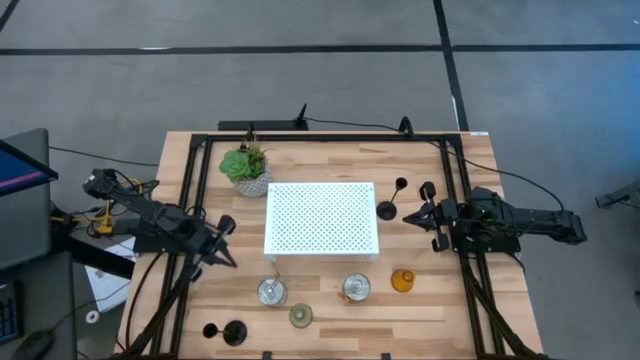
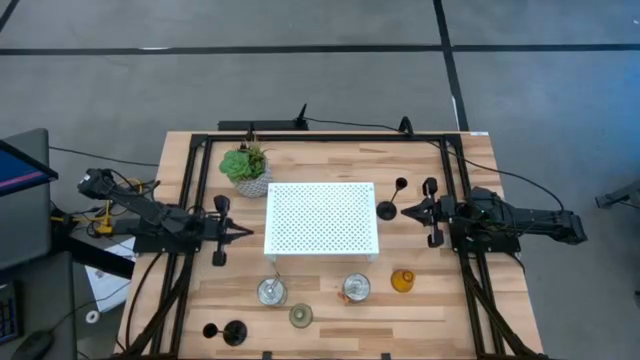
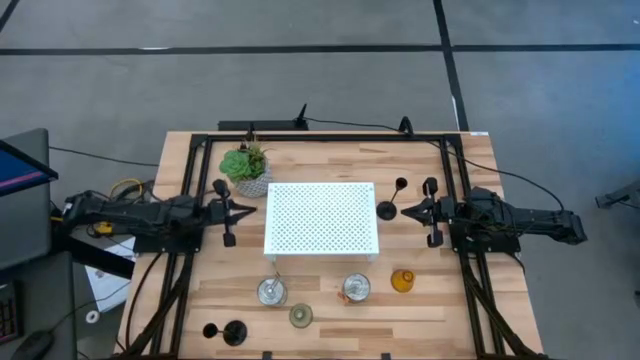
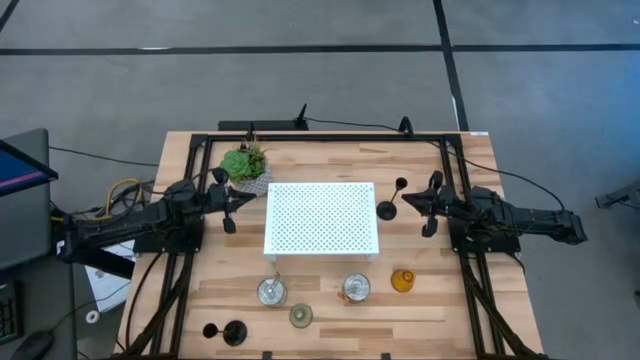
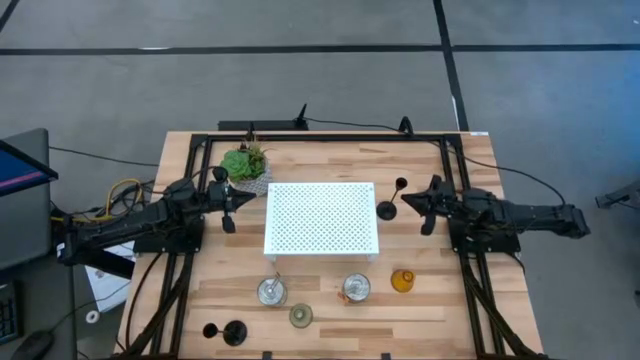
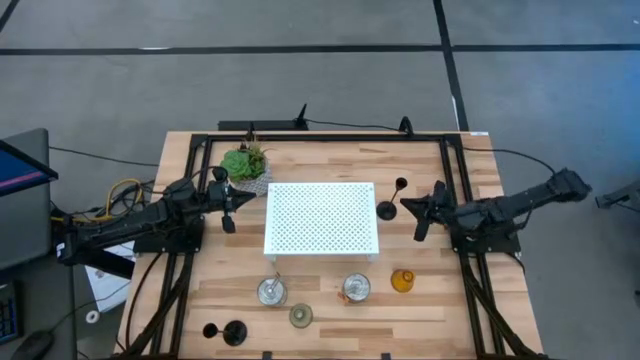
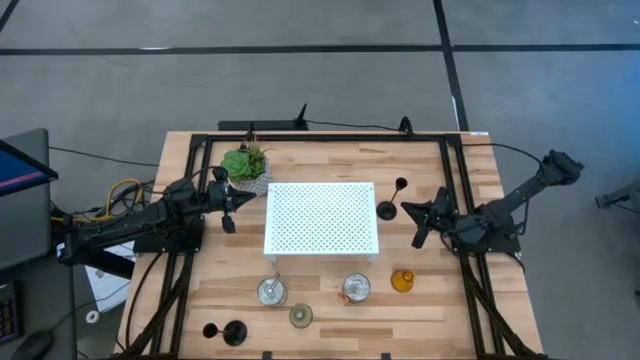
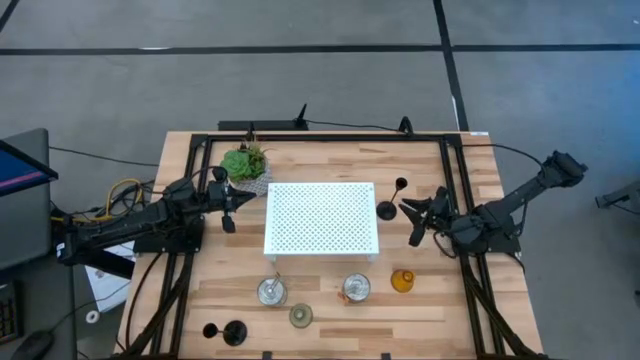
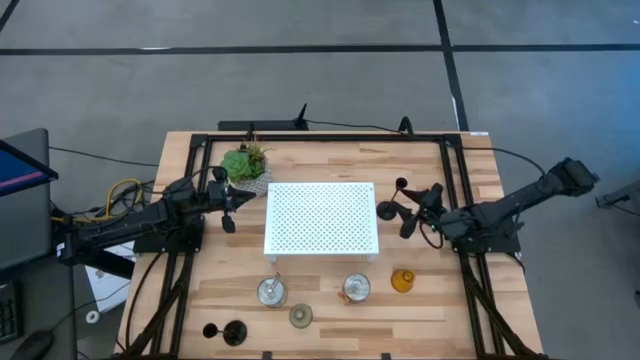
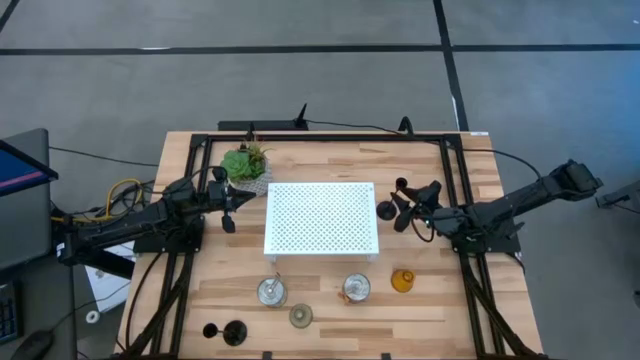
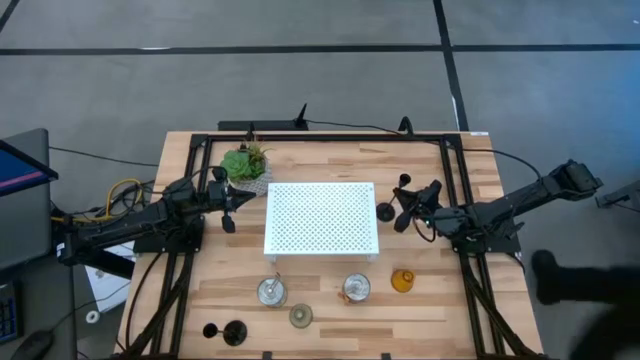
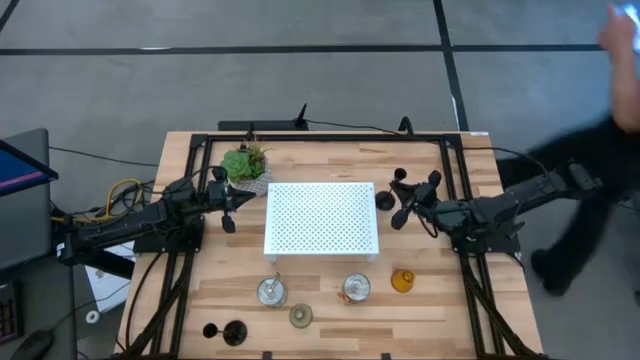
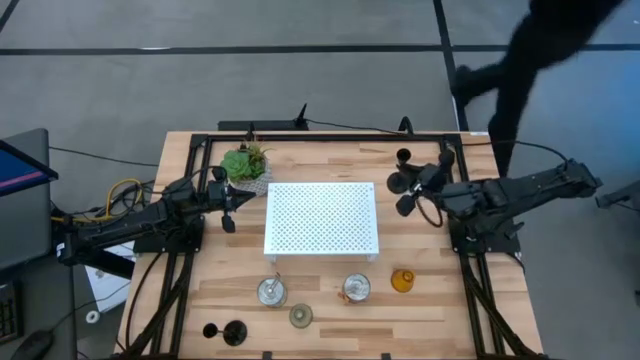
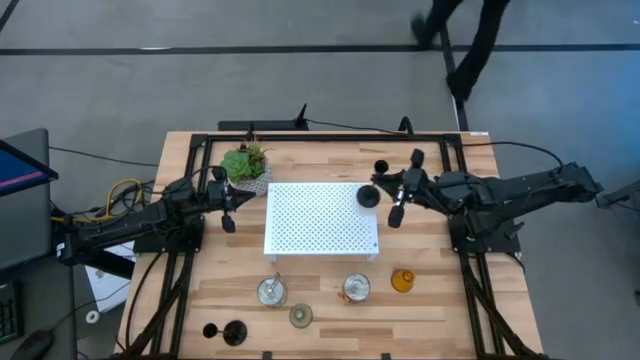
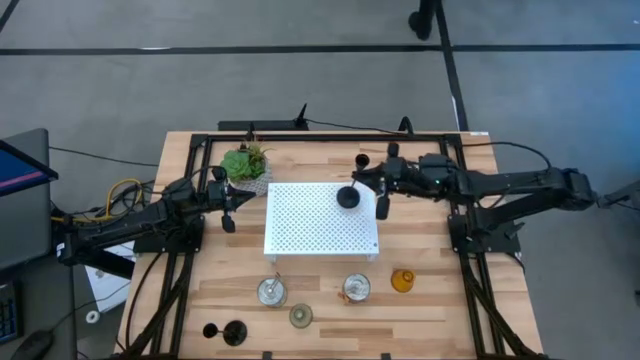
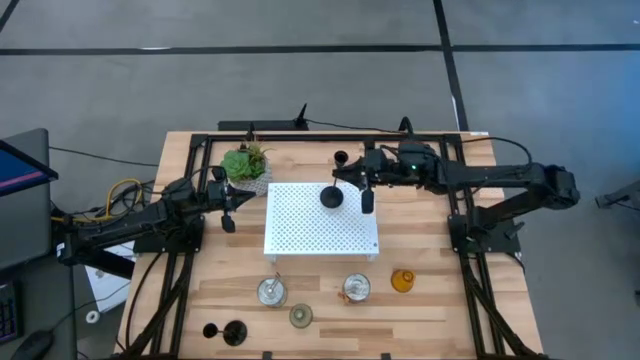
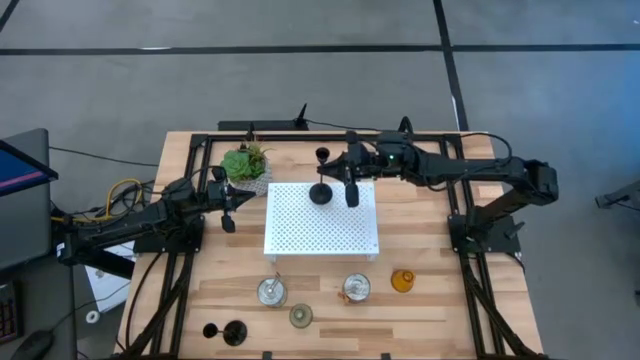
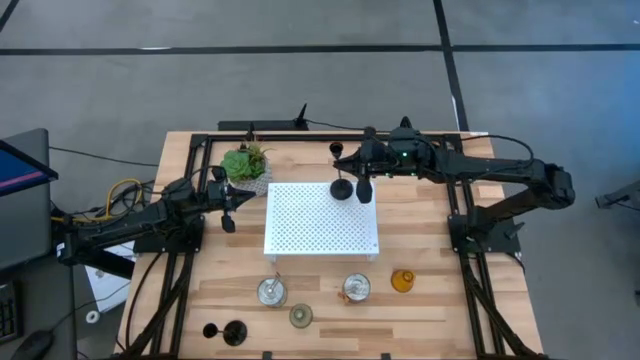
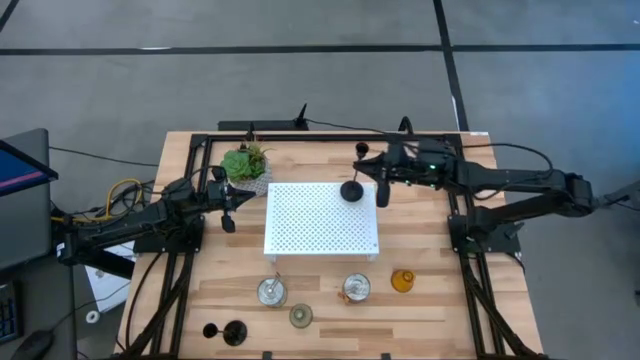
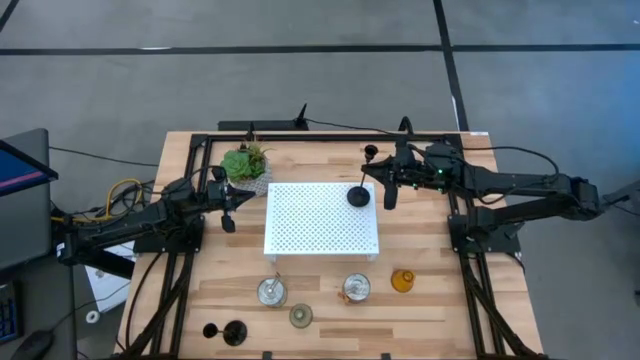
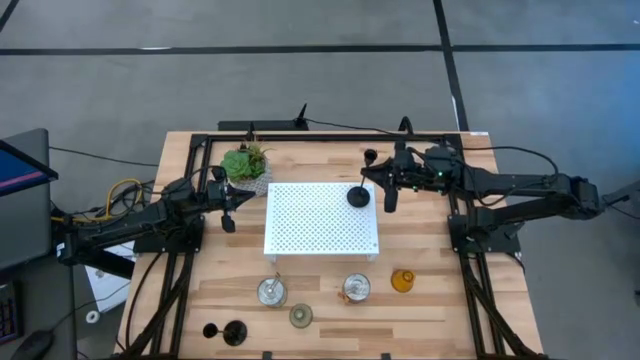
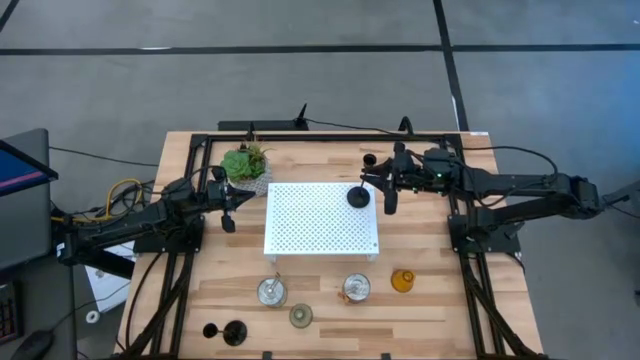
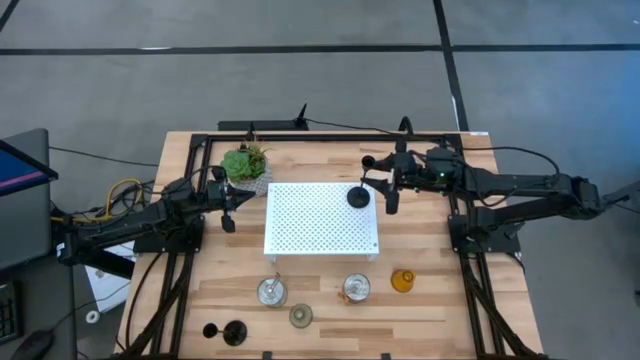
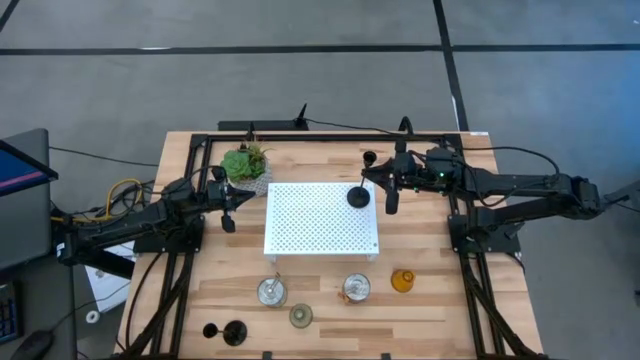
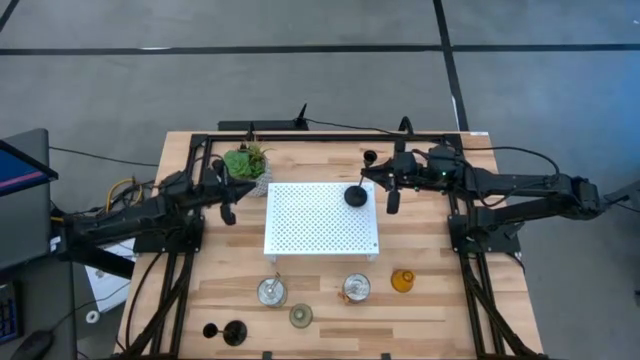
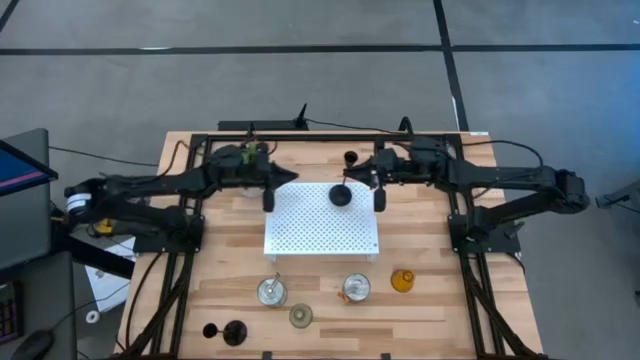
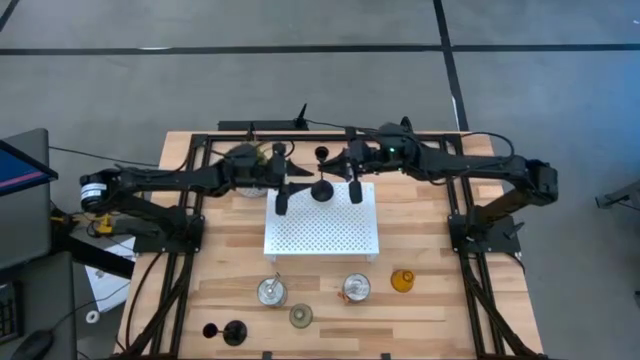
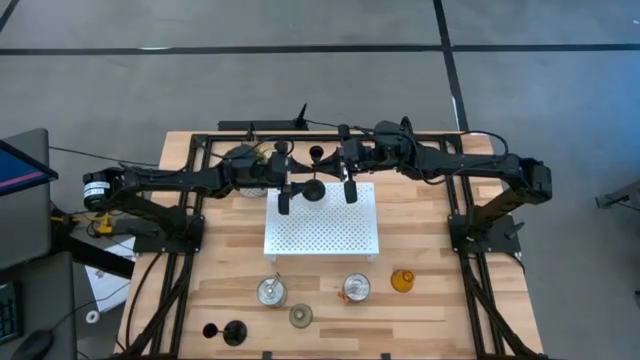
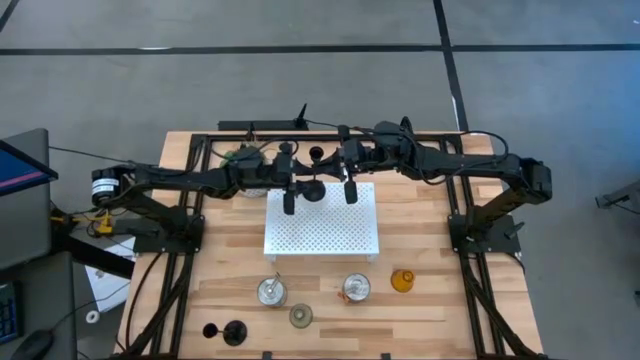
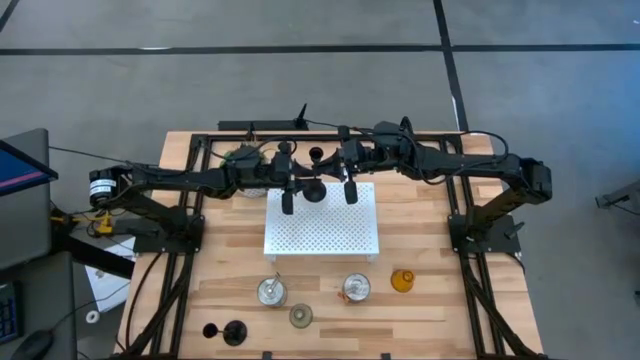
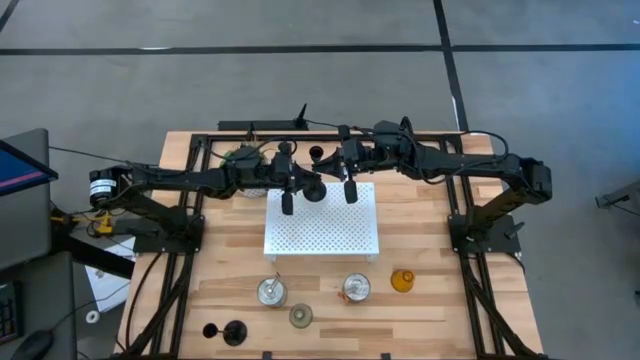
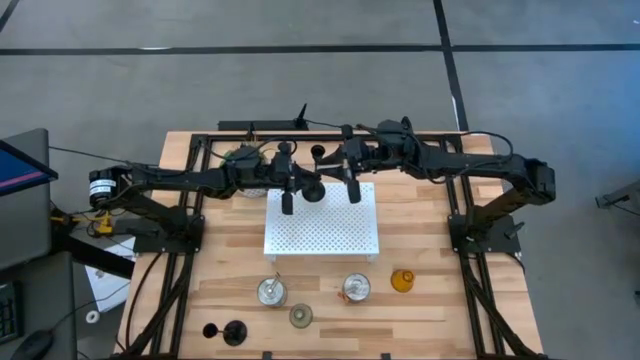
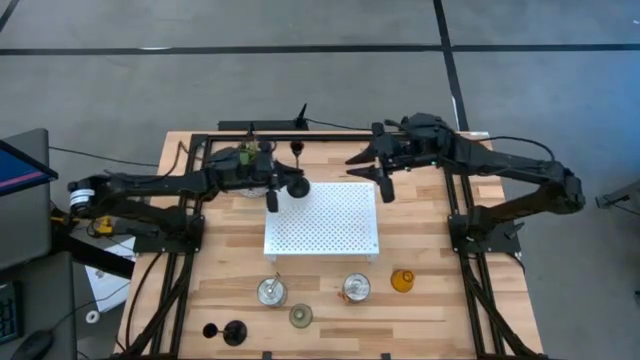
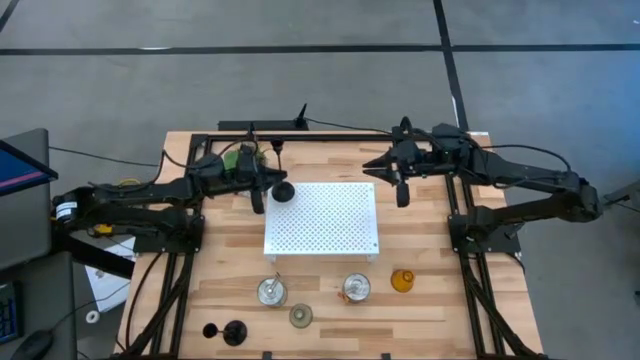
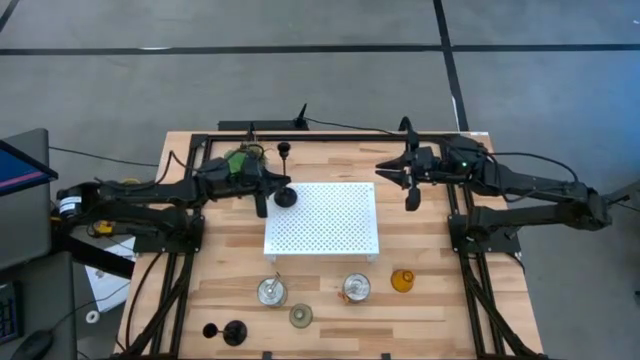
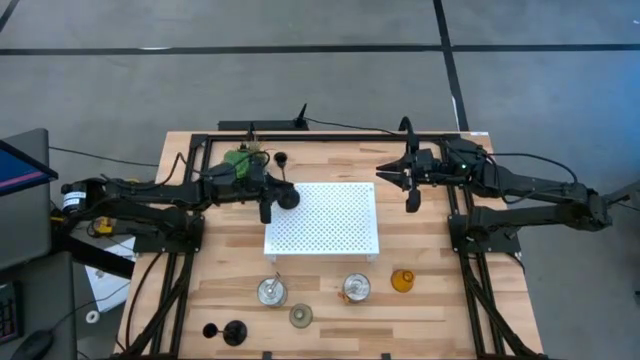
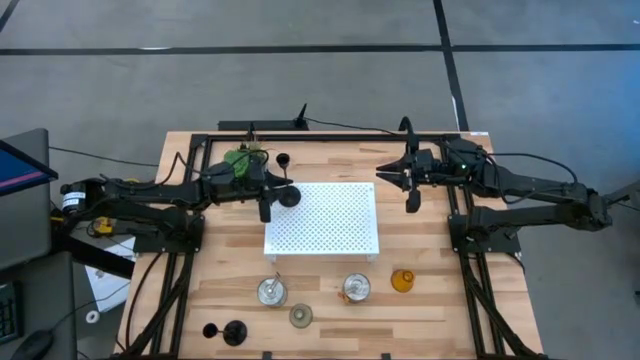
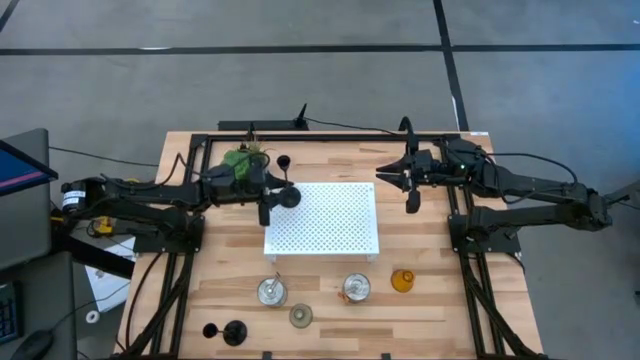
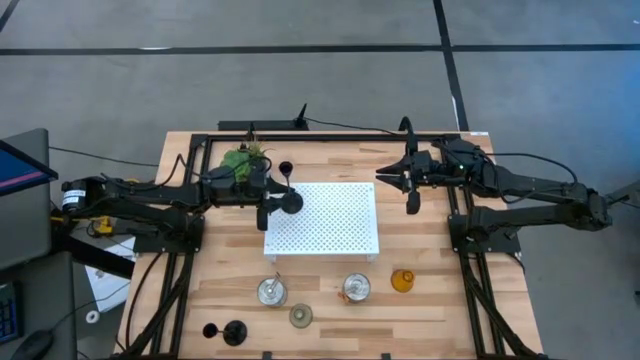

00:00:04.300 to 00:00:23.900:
Task: Pick & Place candle stick holders
Put the top right black candle holder on the shelf
